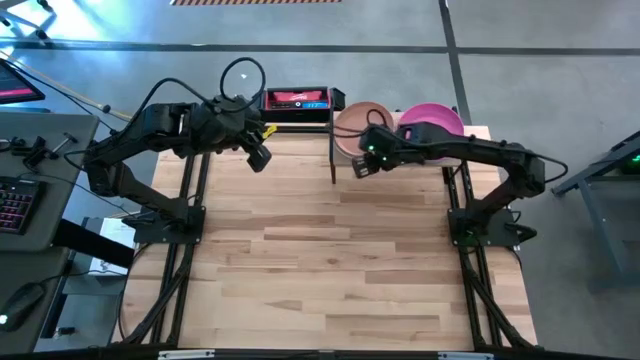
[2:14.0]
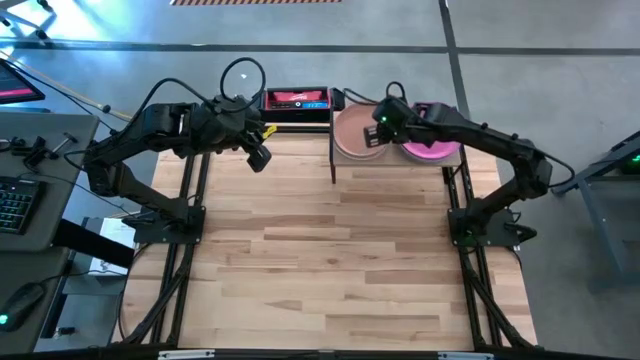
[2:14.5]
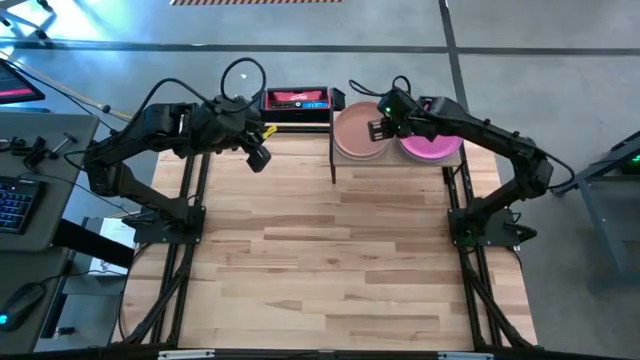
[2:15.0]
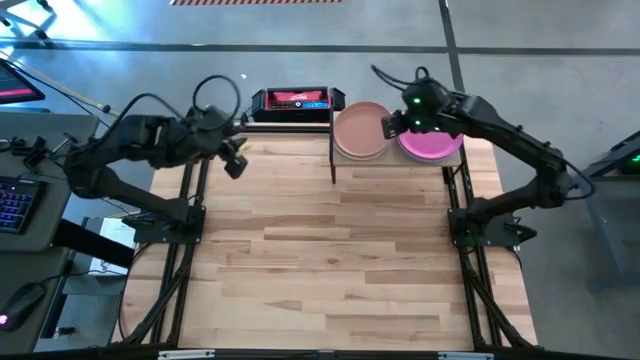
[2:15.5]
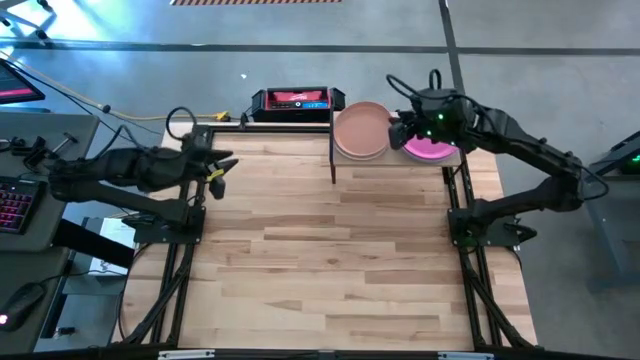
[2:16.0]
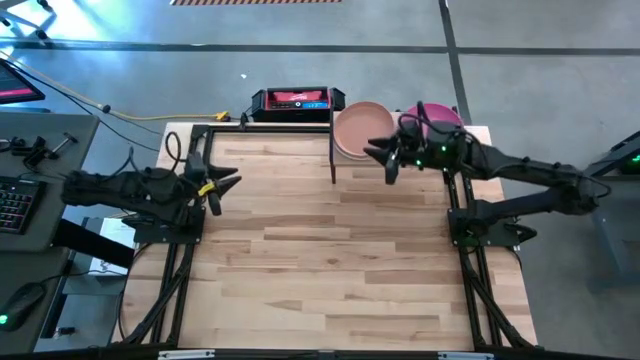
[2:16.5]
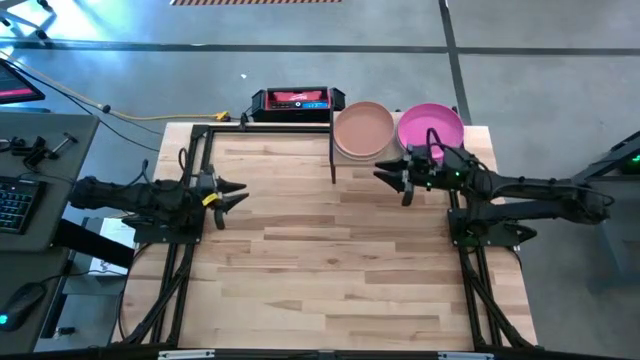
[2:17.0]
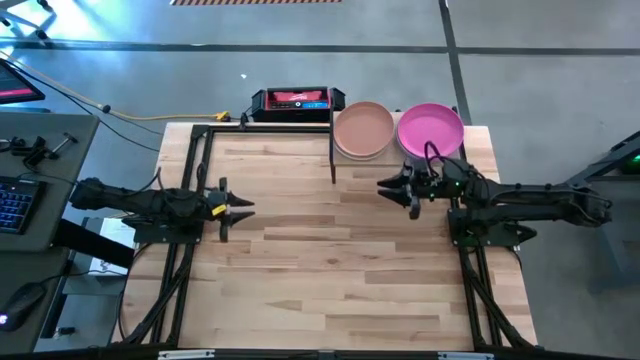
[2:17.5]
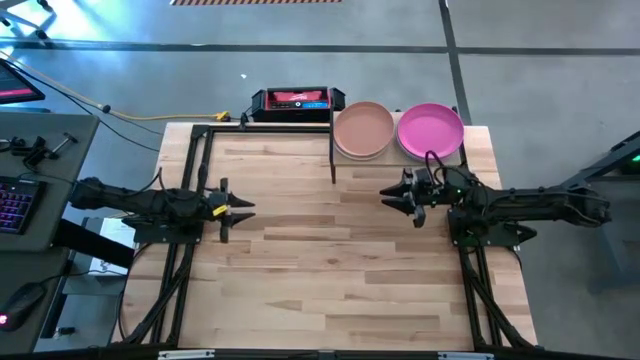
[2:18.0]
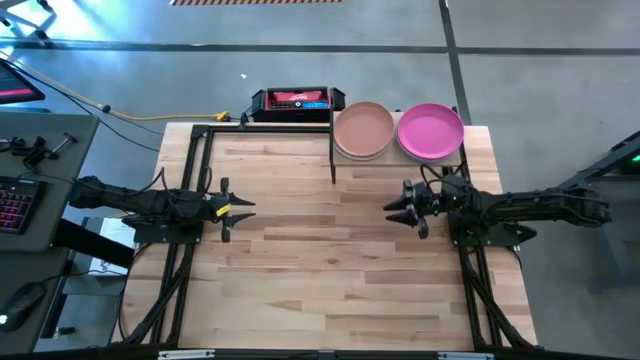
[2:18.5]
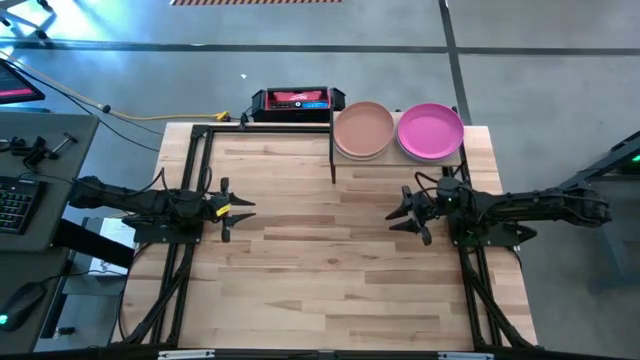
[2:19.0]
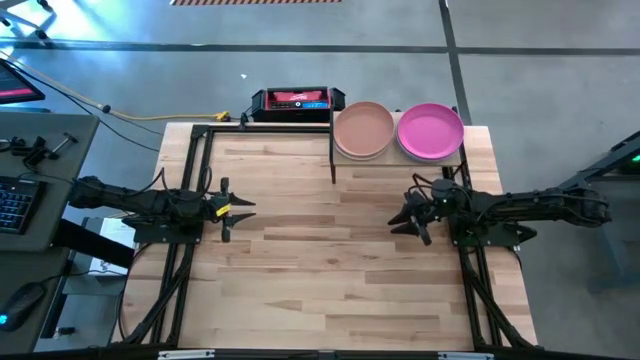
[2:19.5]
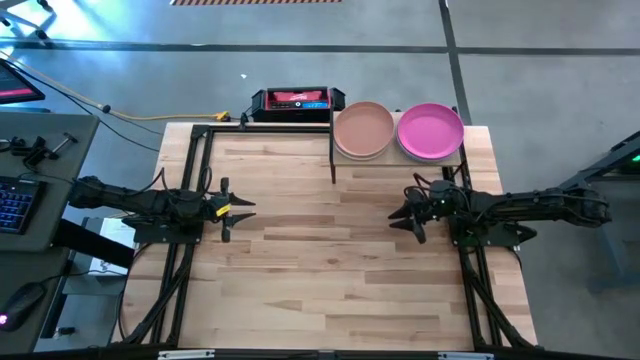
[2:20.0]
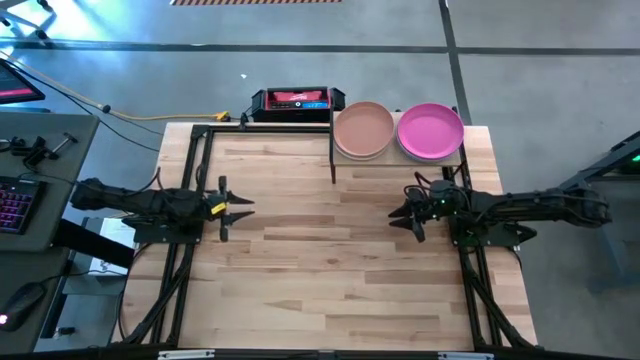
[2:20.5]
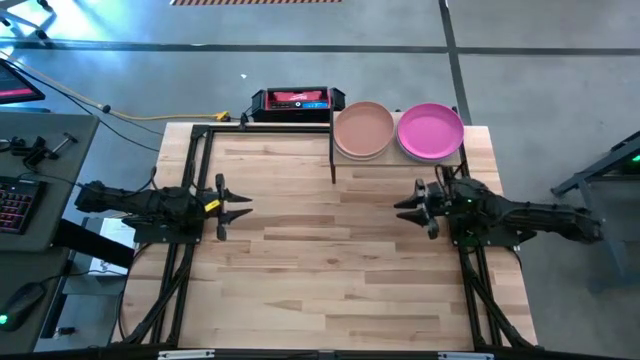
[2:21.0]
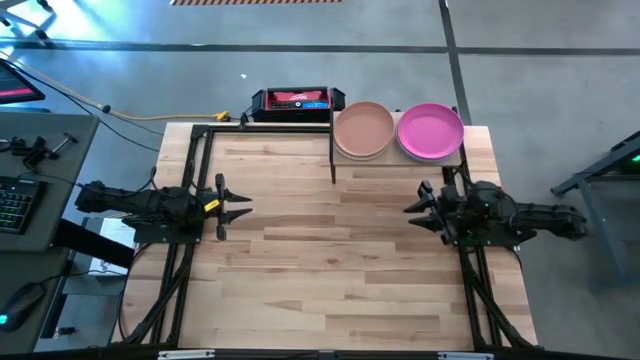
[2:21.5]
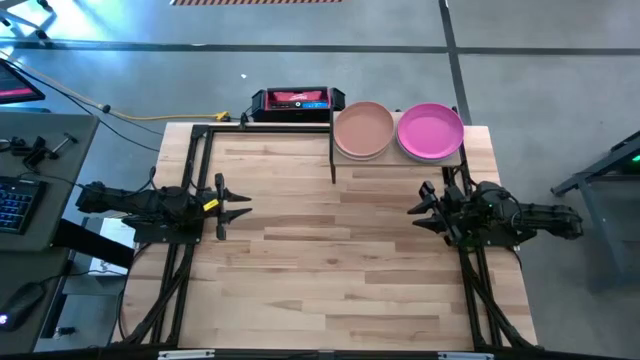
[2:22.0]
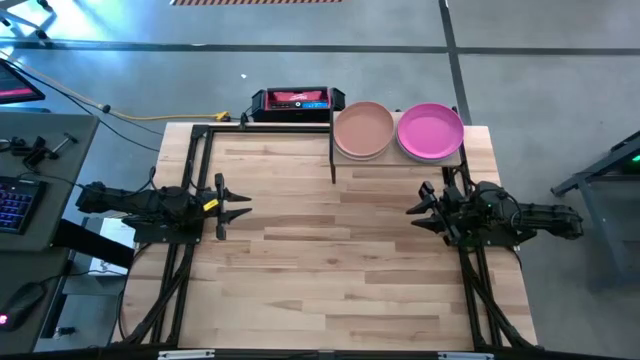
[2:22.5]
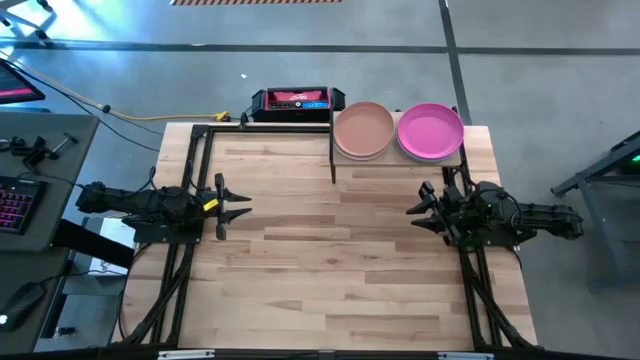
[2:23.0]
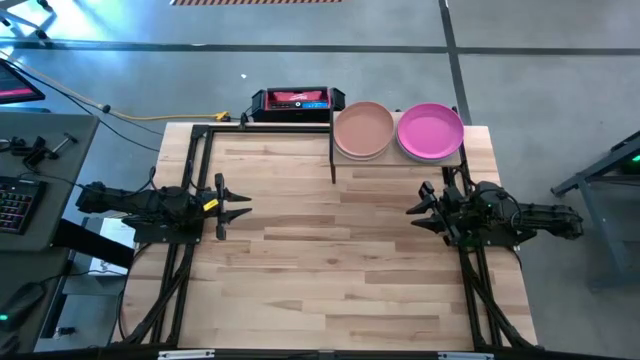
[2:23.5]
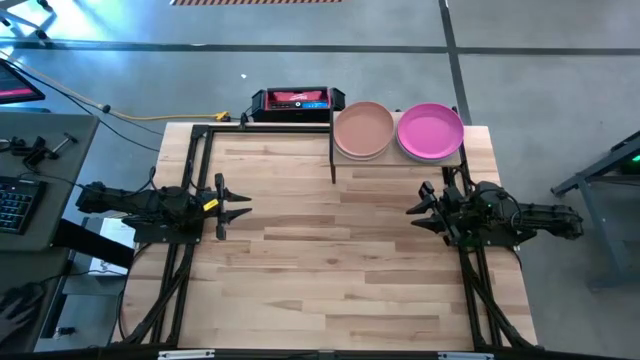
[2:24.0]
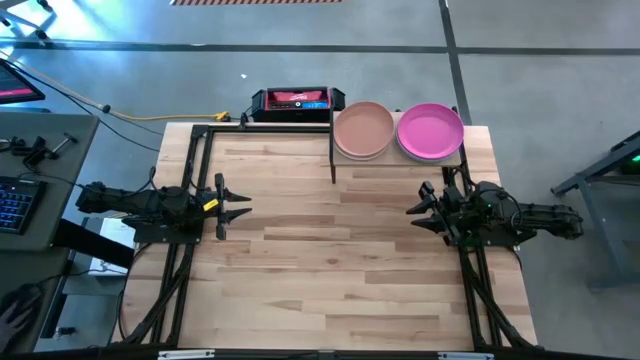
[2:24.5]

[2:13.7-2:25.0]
Task: Place and stack plates onto a shelf
Return to home position

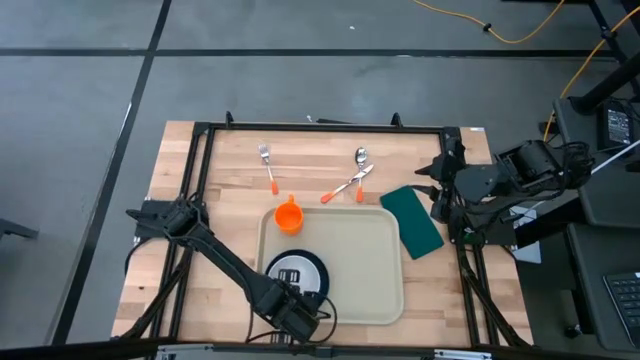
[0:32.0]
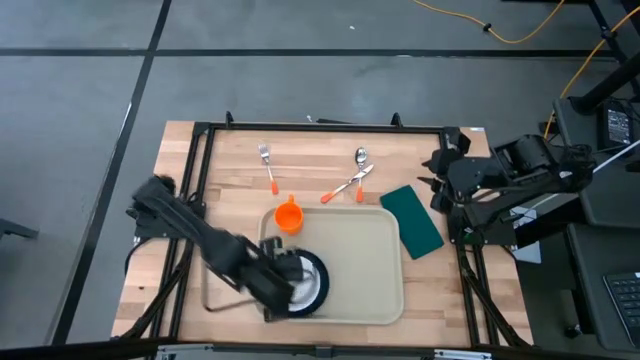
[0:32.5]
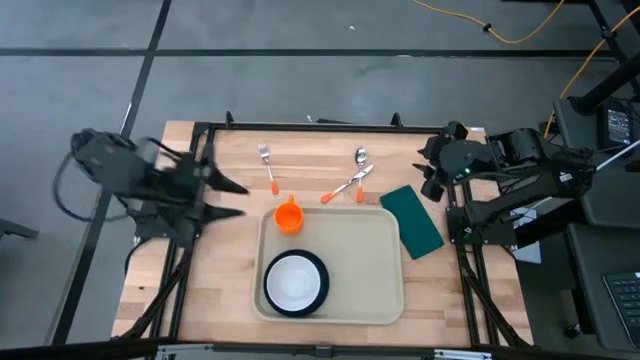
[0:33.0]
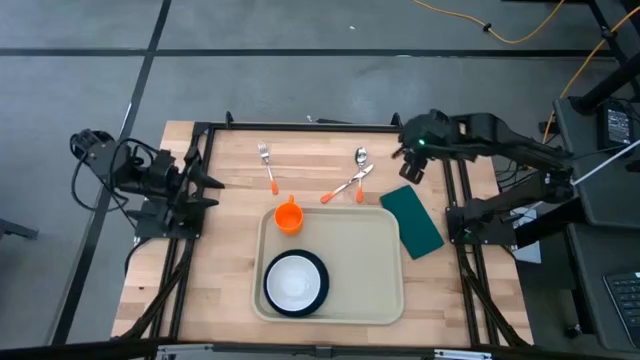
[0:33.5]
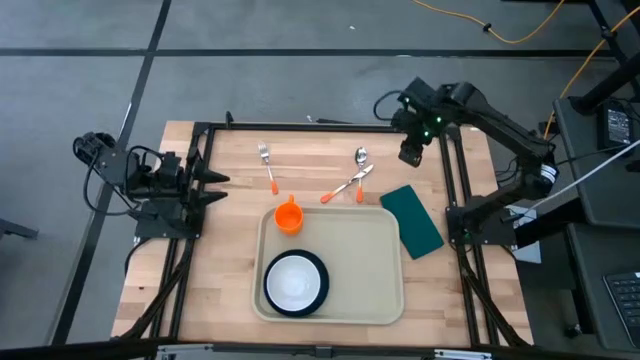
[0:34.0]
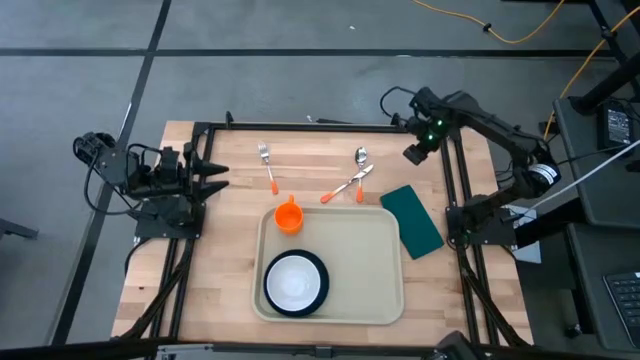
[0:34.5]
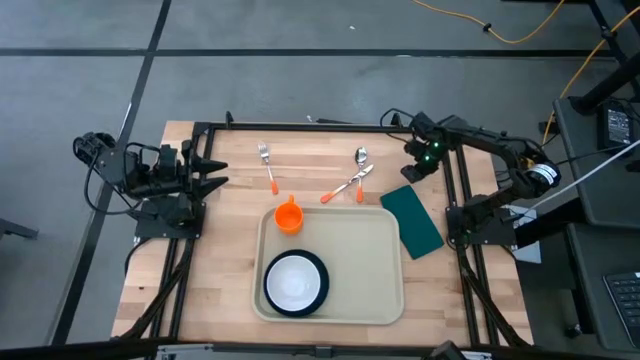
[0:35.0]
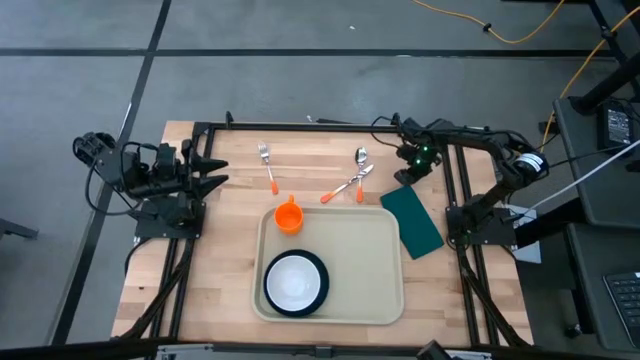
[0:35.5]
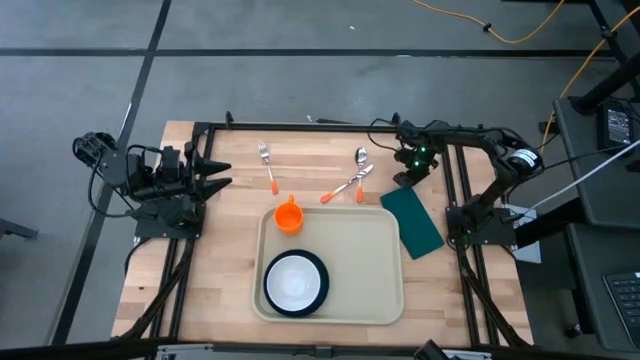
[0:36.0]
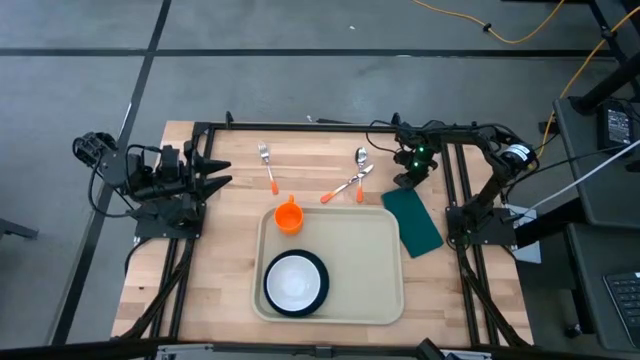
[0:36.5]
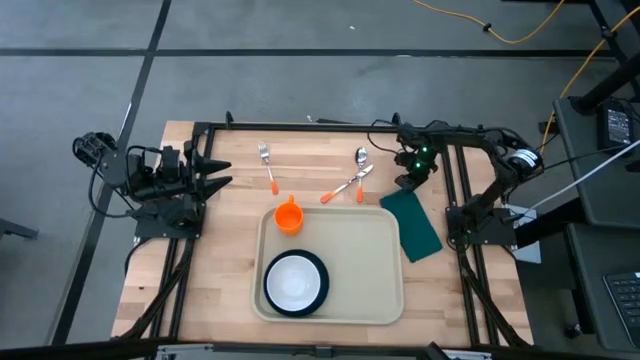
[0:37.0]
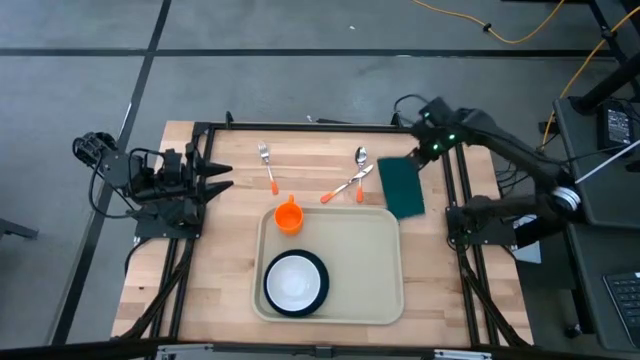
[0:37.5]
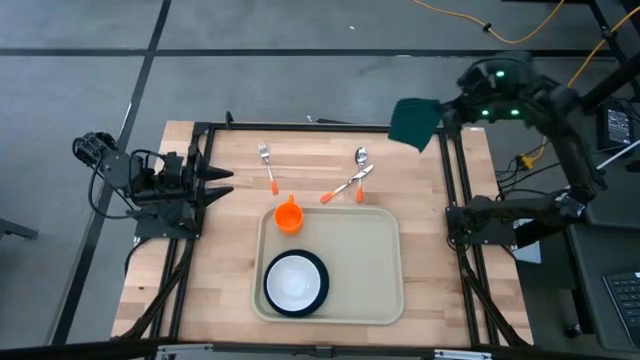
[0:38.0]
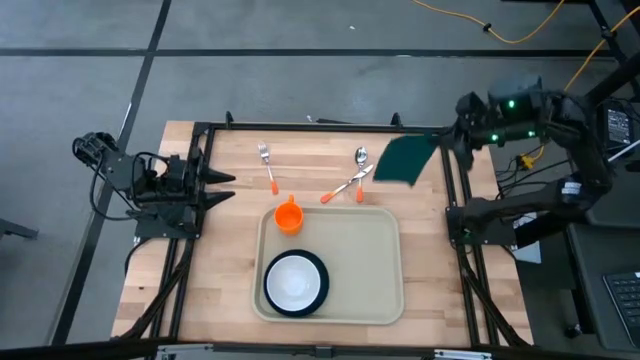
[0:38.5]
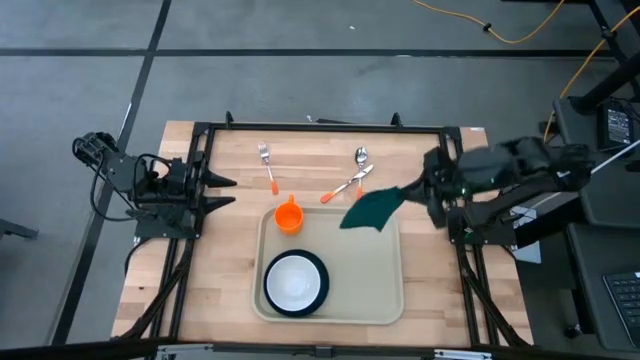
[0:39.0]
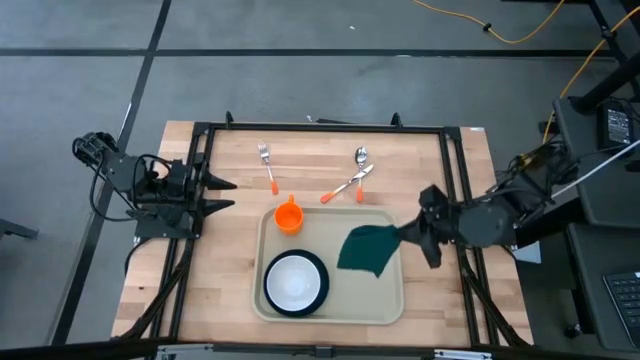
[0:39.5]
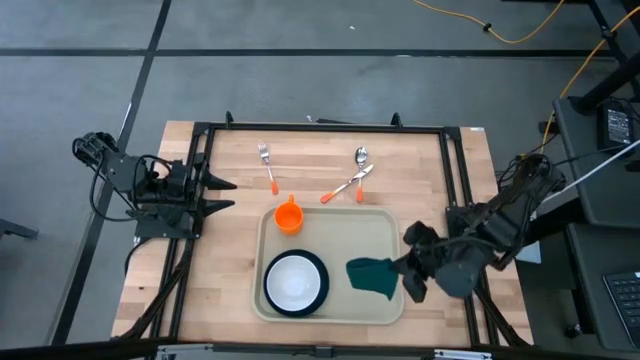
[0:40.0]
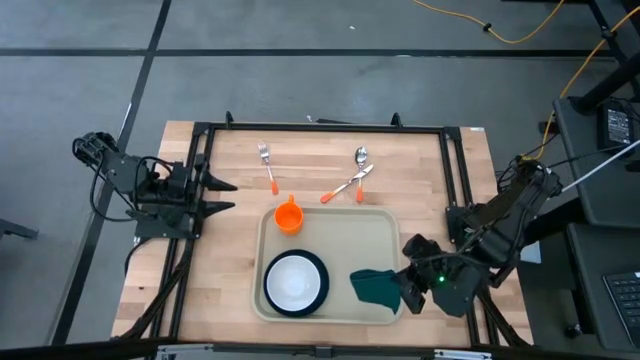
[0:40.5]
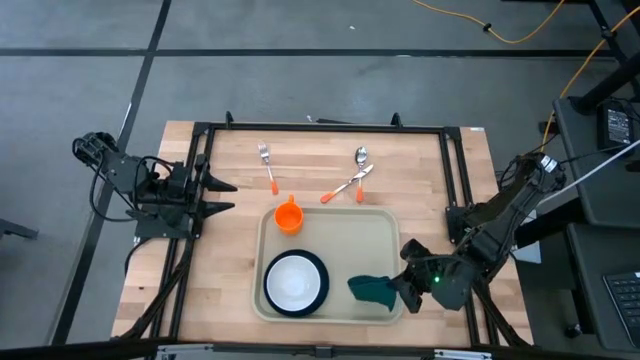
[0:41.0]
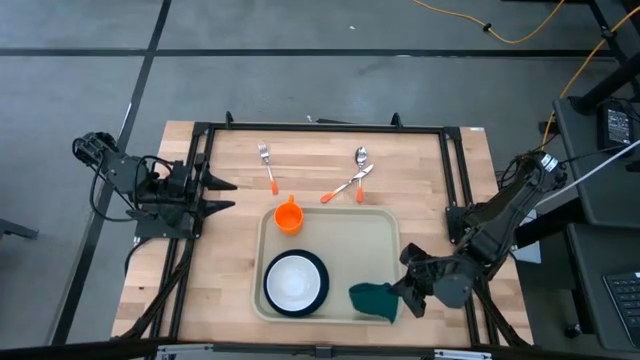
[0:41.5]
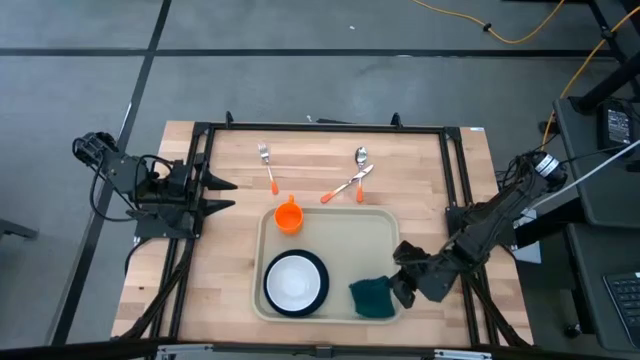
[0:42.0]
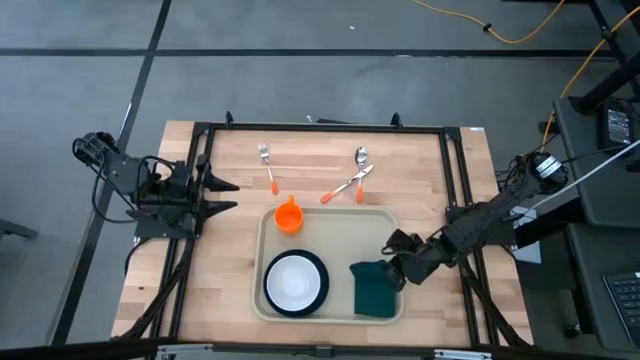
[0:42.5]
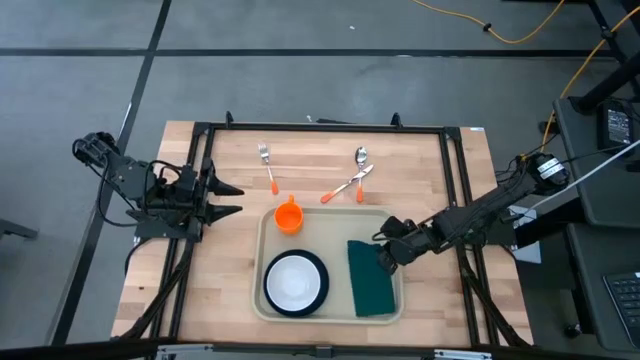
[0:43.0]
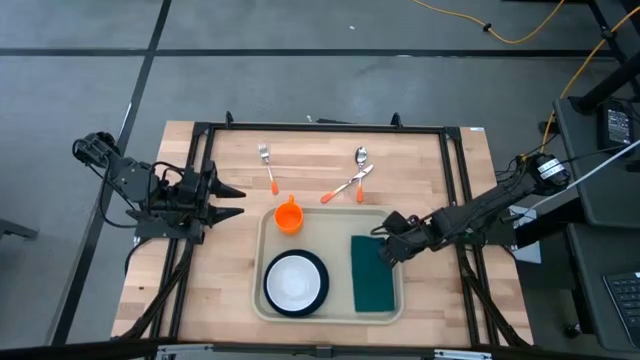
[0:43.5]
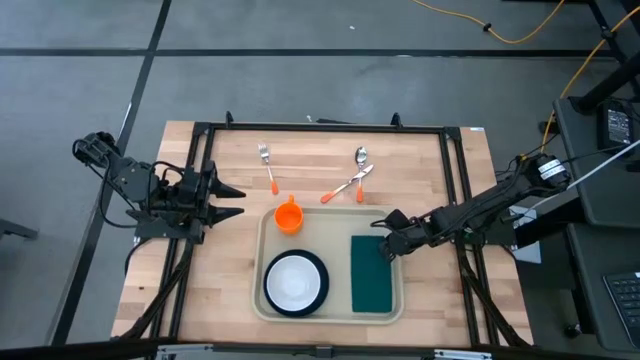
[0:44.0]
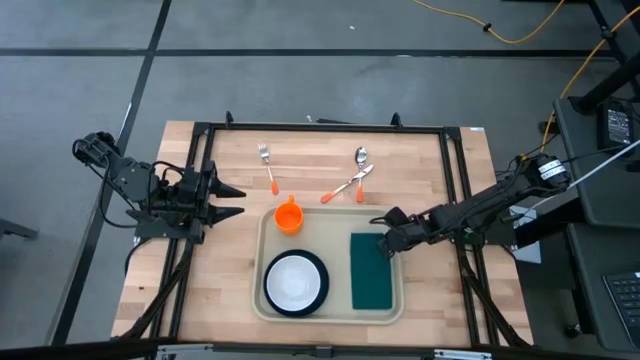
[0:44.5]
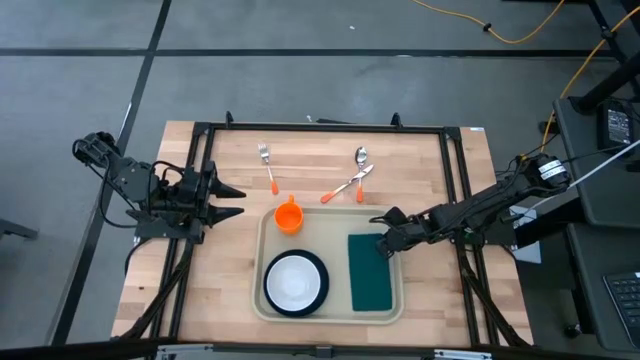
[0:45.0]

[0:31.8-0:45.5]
Task: Set up tray
Put the green table napkin on the light brown serving tray to the right of the blue plate
